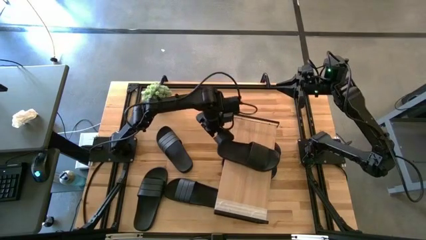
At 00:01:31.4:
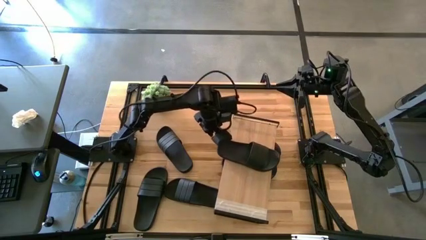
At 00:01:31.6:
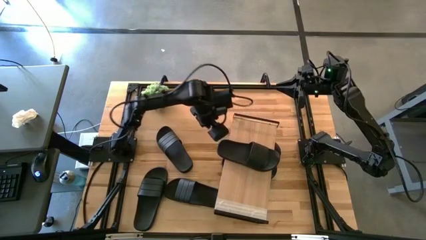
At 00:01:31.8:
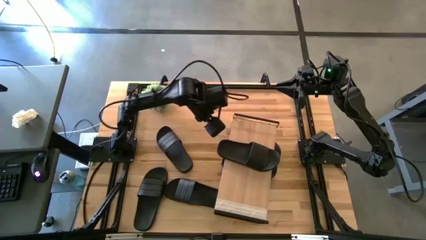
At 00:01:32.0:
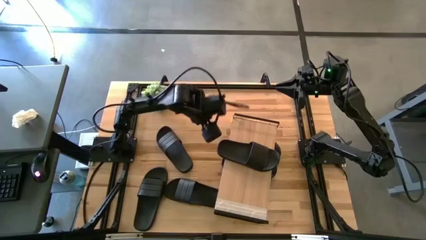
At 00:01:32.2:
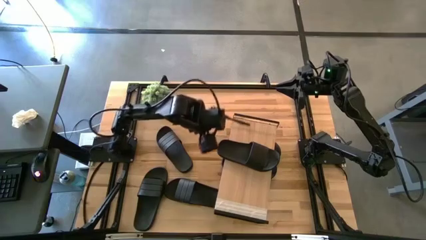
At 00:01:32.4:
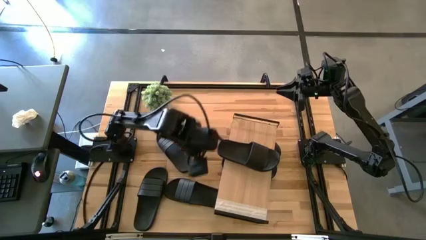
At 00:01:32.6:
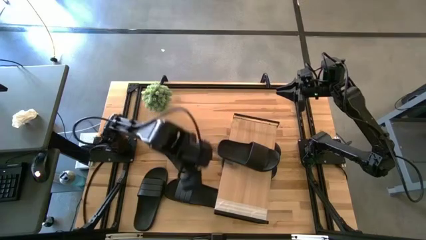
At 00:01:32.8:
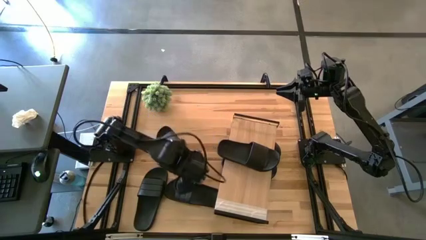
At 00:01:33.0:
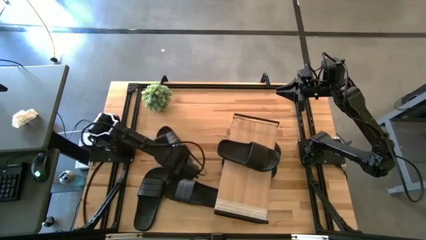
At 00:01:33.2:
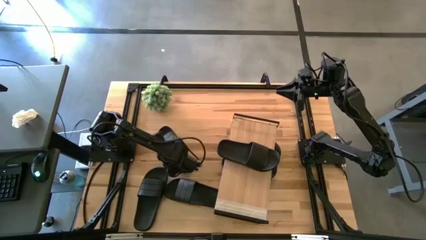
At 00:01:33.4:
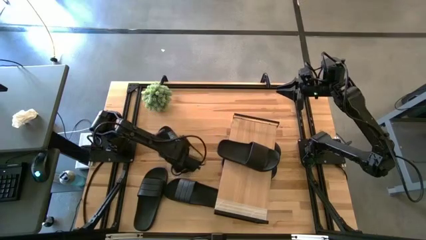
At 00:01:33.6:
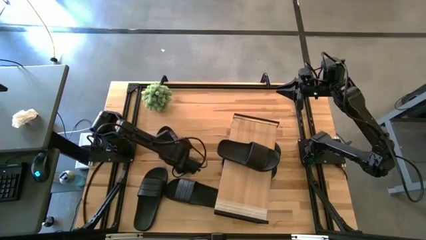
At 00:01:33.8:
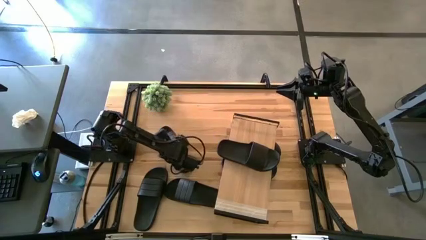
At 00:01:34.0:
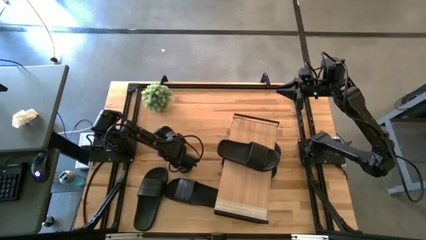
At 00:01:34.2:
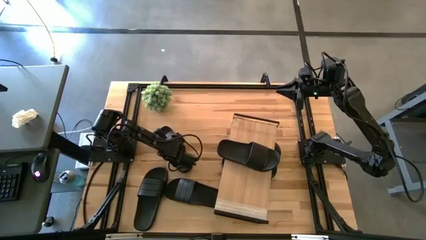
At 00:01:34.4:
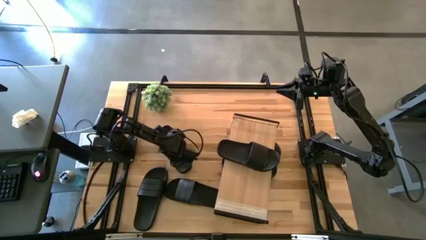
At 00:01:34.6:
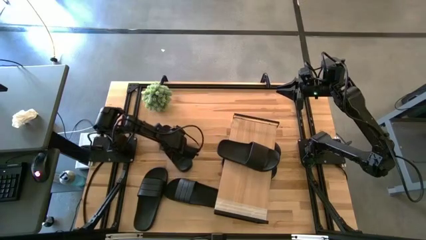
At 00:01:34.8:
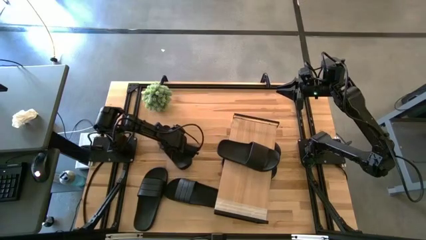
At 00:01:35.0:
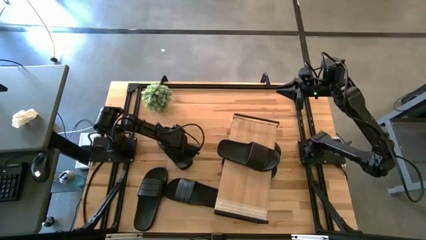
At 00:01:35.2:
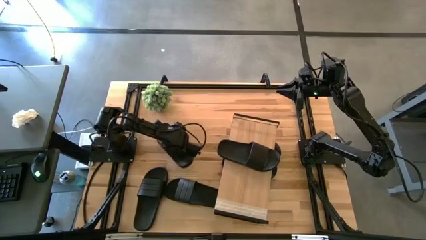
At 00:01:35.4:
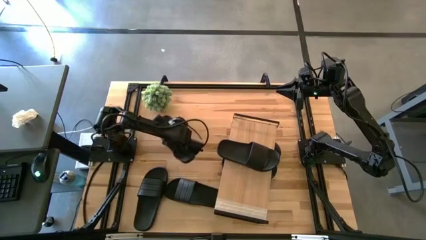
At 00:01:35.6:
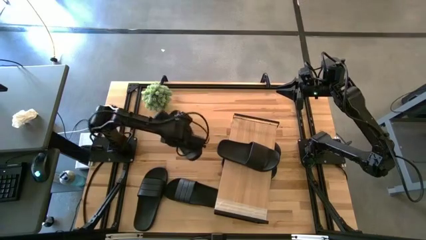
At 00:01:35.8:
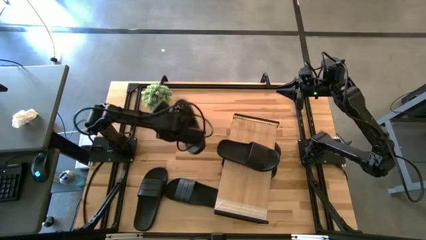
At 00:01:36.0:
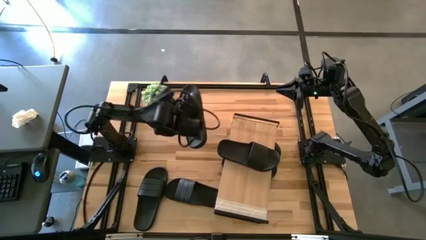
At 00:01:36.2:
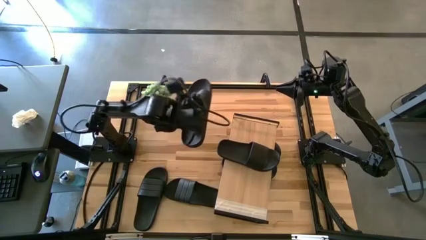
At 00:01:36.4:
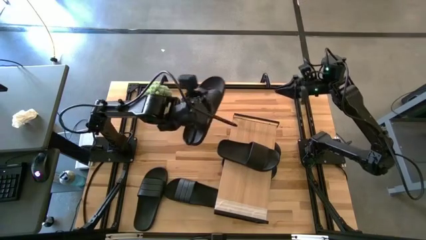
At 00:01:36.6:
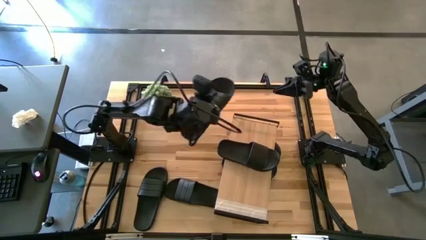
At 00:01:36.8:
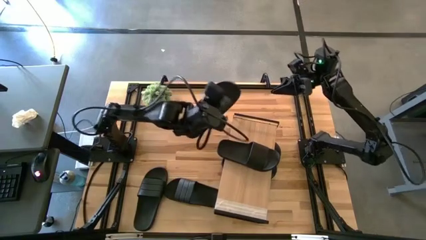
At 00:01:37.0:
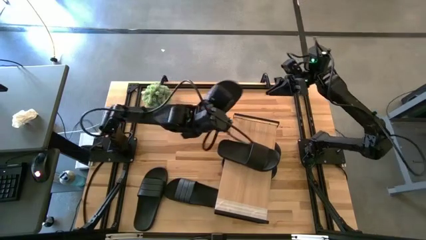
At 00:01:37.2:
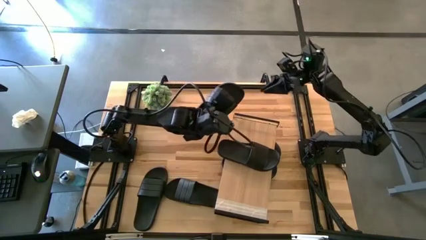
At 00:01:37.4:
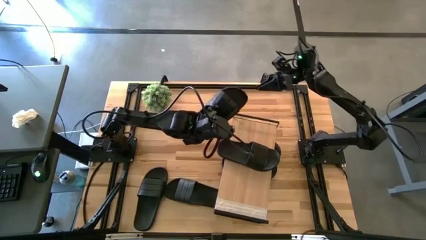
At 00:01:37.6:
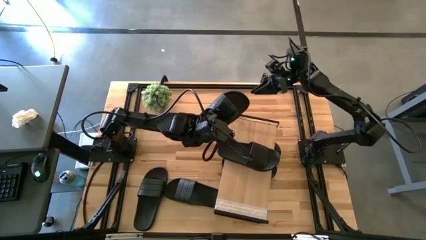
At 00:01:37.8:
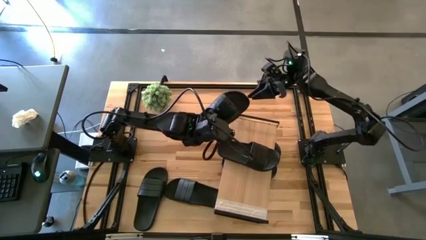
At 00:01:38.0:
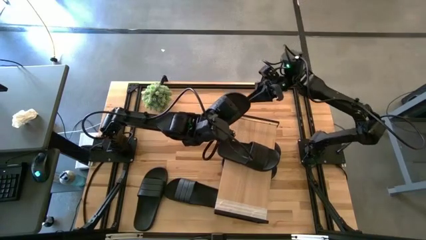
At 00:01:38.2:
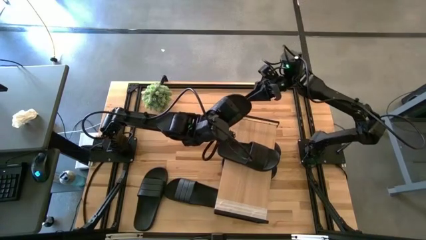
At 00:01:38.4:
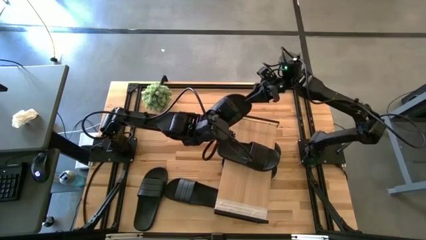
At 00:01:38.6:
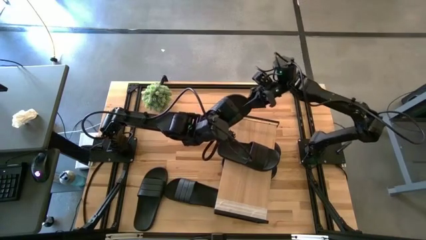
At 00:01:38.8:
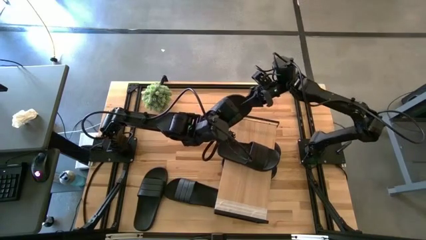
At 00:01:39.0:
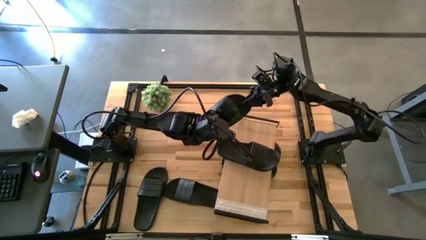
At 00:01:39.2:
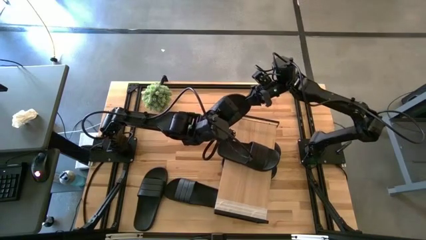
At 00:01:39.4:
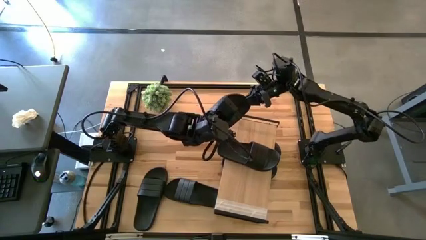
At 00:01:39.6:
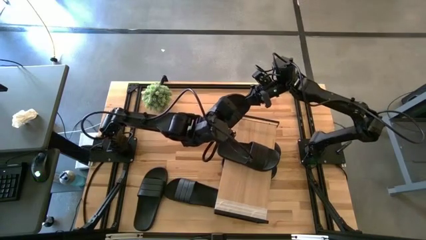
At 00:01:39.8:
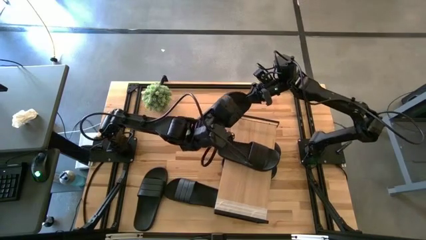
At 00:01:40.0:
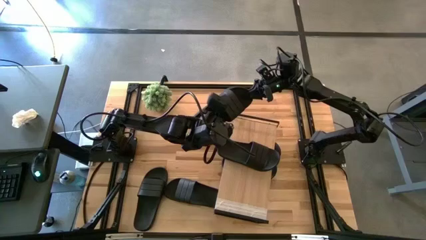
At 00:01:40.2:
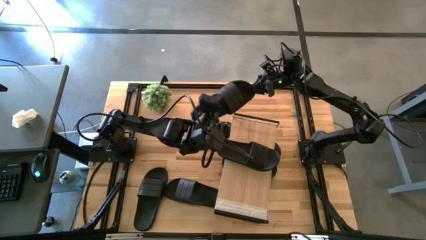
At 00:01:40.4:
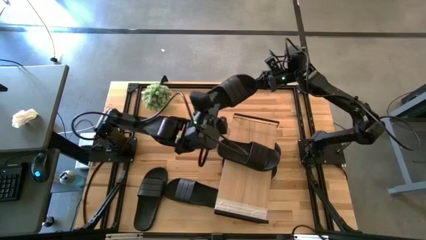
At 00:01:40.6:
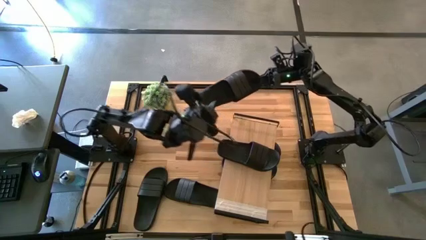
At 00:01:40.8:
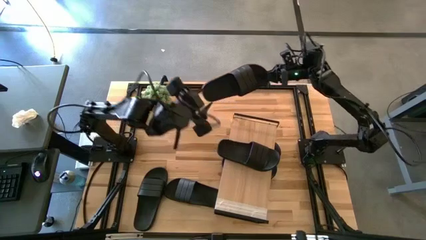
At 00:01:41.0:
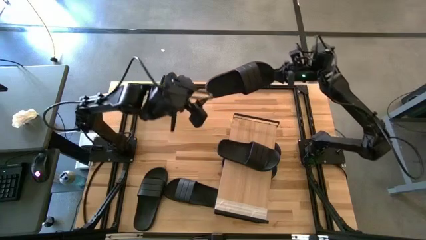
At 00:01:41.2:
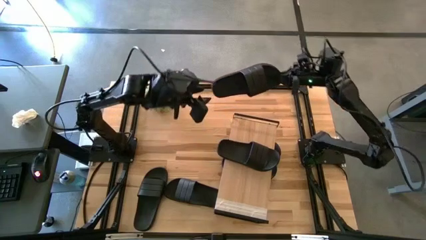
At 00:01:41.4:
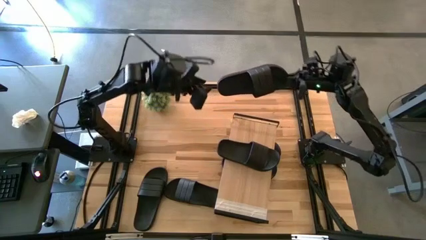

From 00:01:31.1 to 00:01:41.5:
Task: Pick and place slides into the shelf
Put the top black slide on the shelf

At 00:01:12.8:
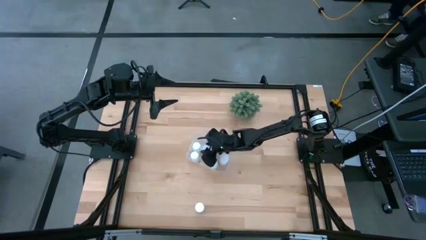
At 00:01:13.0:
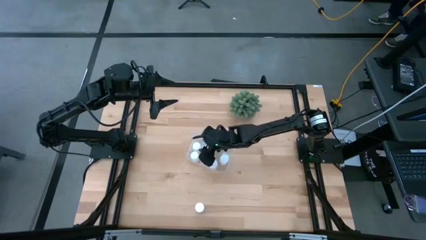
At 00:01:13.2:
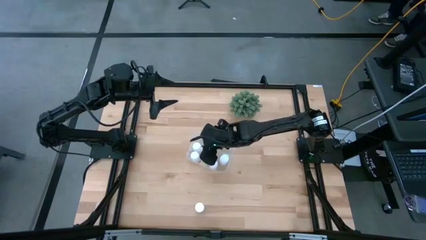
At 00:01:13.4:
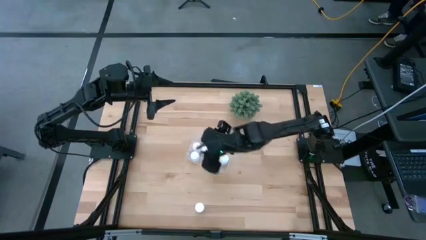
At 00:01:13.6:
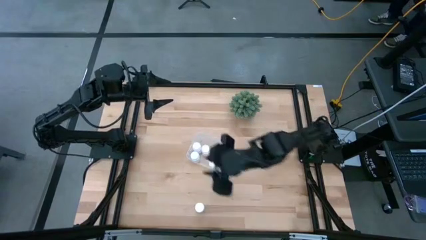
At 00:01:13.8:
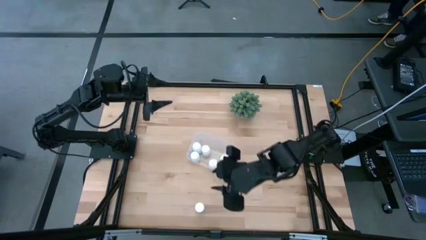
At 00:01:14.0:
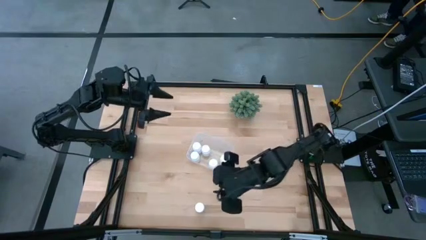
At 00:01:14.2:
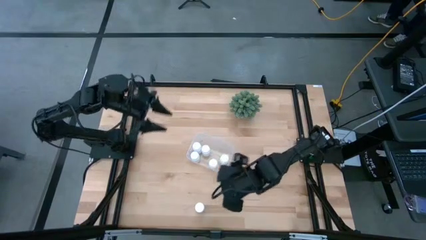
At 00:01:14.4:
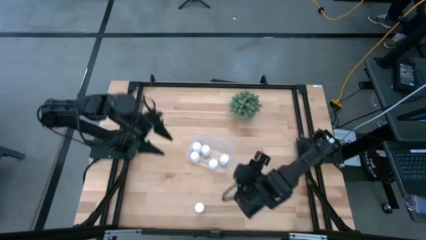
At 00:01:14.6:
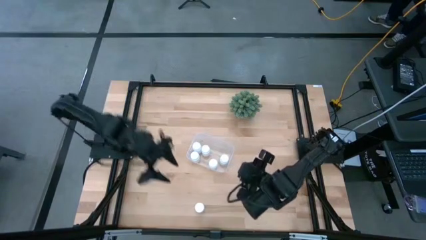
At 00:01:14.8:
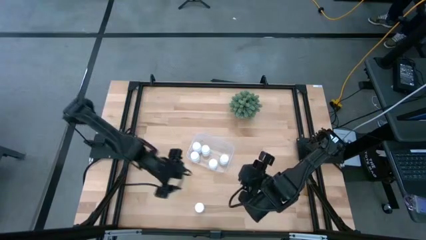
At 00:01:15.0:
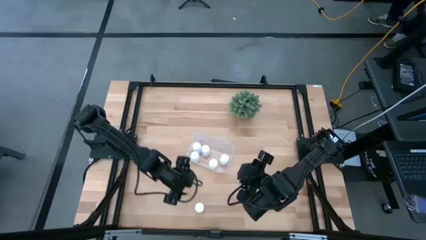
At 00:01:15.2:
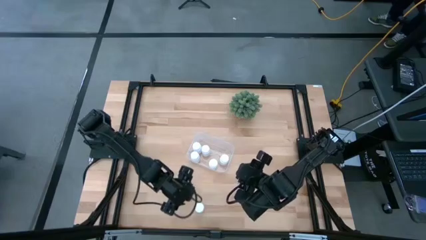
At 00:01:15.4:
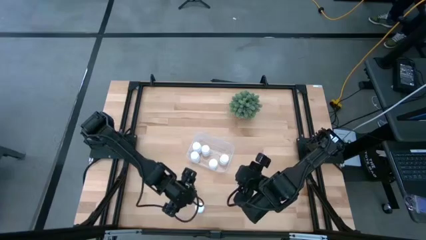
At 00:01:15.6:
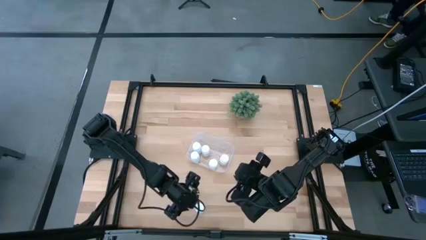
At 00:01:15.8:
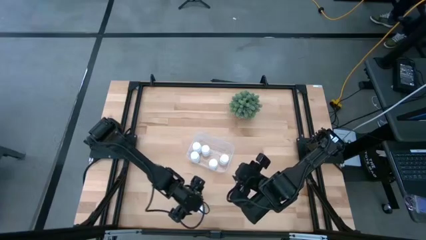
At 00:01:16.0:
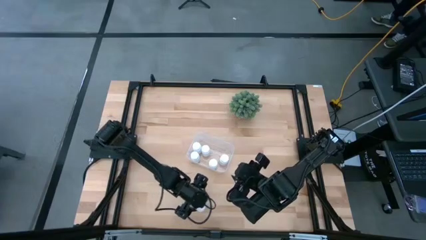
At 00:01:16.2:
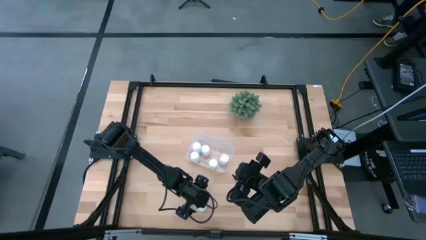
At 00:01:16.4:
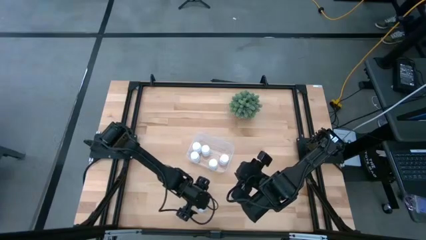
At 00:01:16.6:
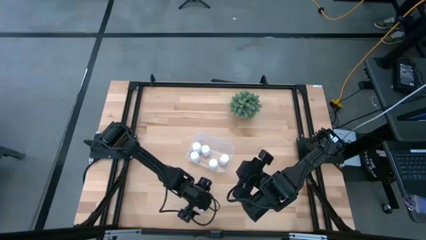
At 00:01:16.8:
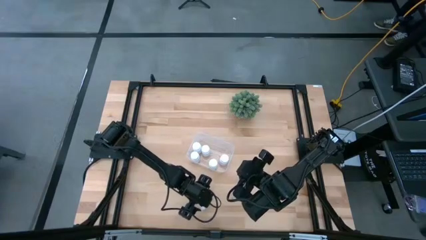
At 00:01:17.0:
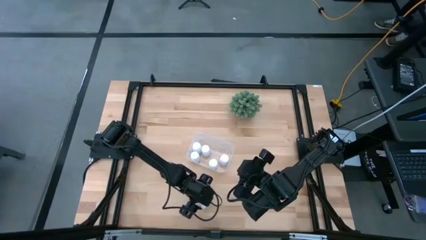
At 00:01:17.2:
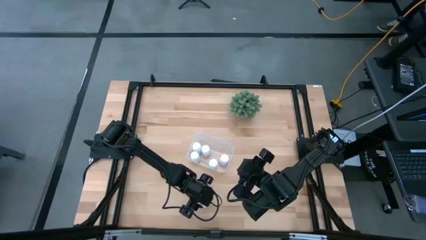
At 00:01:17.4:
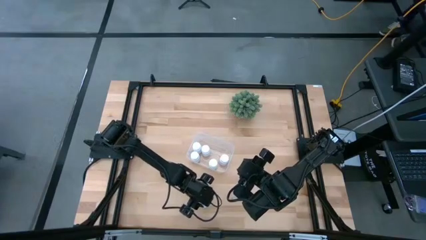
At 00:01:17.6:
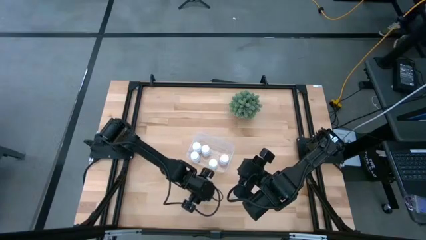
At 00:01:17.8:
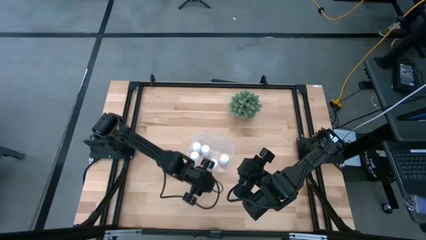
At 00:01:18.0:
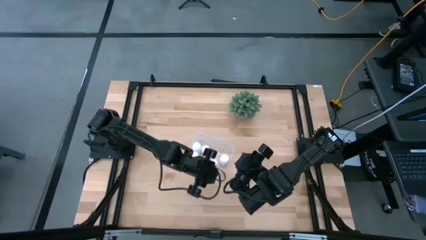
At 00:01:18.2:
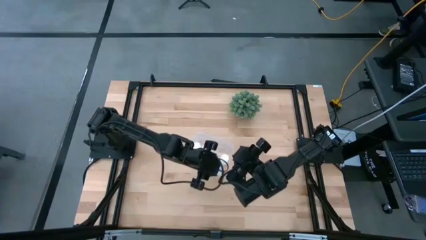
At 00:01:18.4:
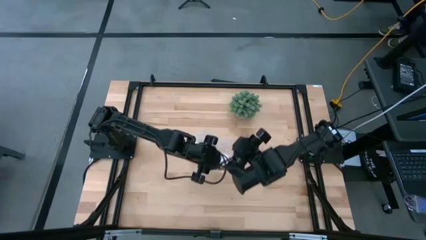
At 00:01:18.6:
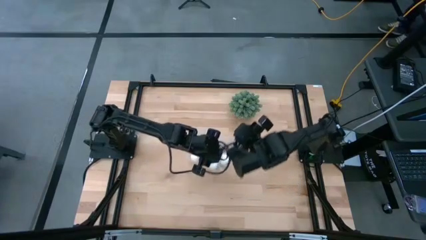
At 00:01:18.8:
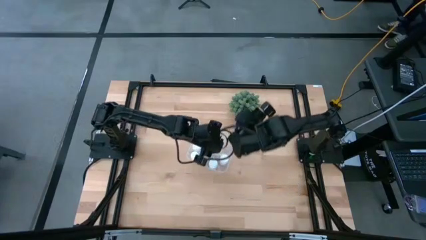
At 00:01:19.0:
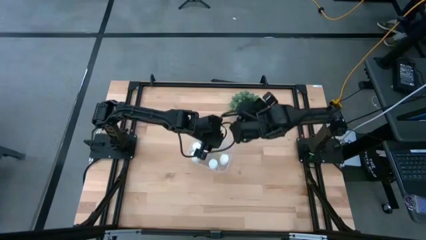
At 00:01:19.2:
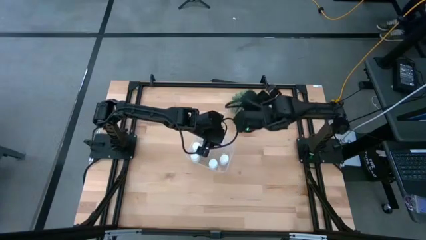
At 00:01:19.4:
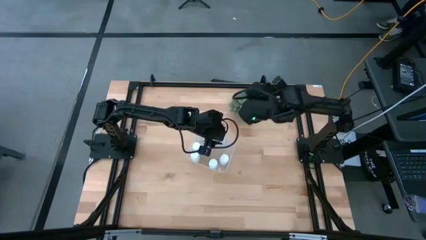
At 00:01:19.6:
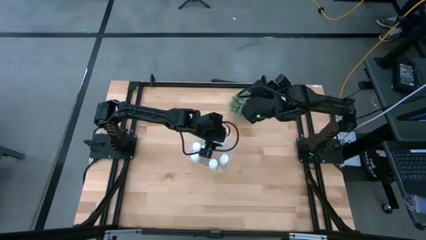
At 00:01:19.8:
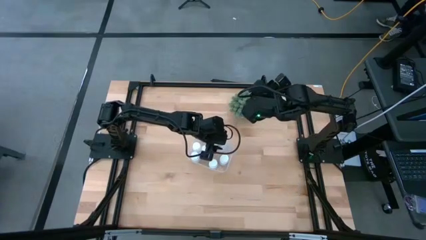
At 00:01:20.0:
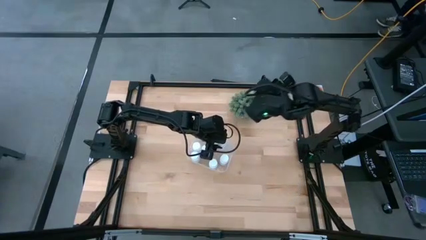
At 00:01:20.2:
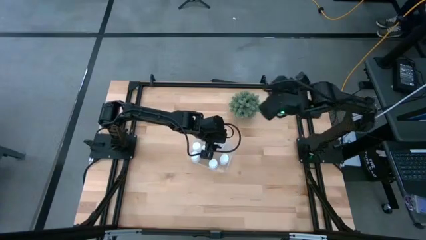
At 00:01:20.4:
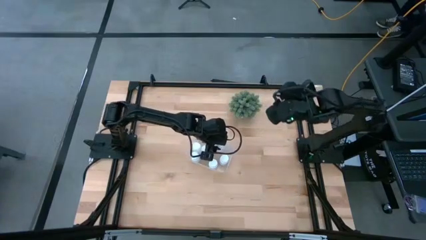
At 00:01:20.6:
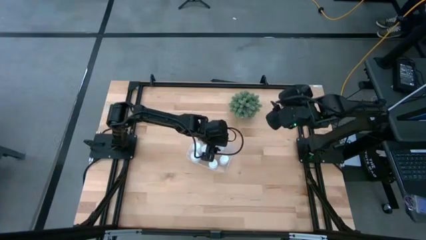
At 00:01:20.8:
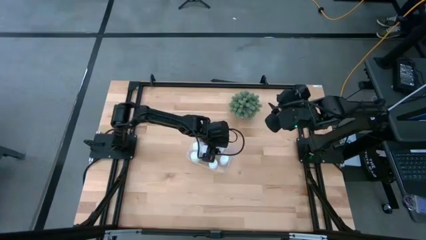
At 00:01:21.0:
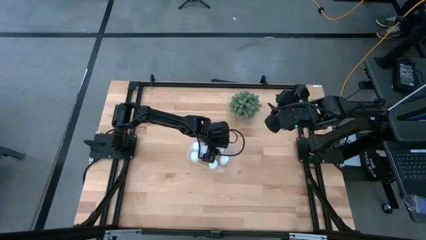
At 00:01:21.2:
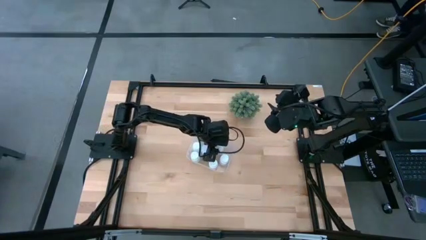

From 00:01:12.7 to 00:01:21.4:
Task: Pick and place pill bottles into a basket
Put the white pill bottle into the transparent bin
